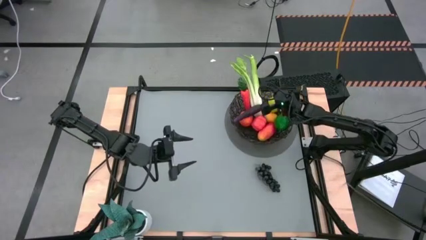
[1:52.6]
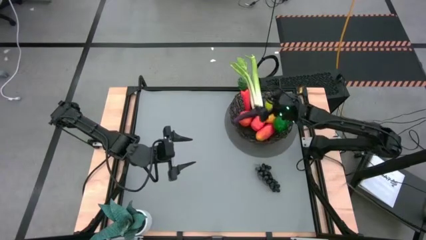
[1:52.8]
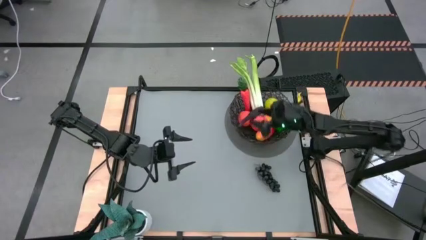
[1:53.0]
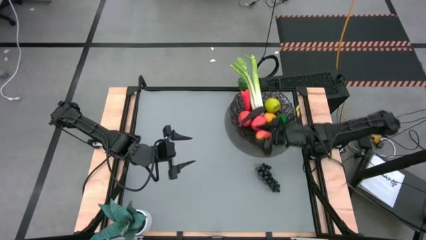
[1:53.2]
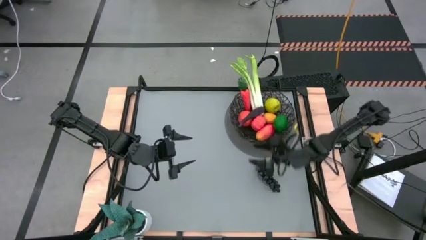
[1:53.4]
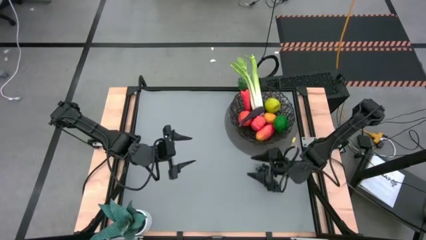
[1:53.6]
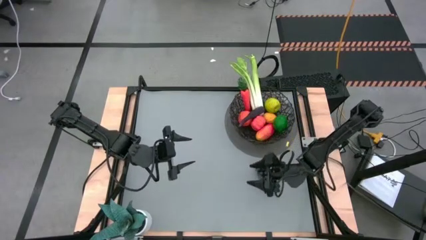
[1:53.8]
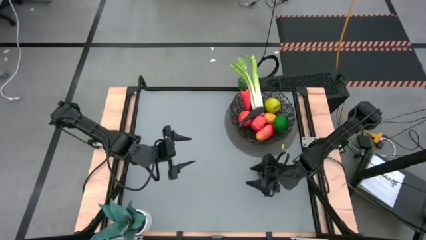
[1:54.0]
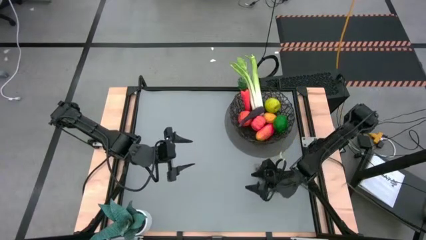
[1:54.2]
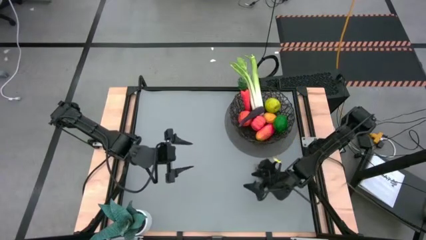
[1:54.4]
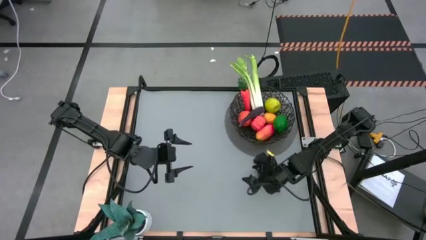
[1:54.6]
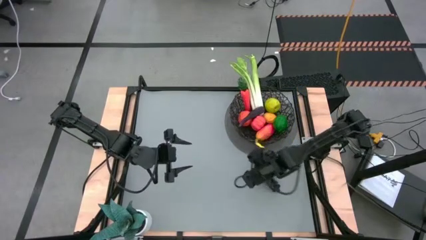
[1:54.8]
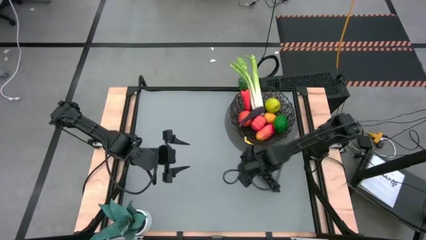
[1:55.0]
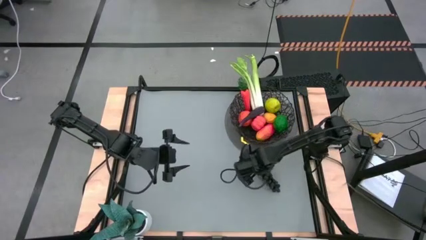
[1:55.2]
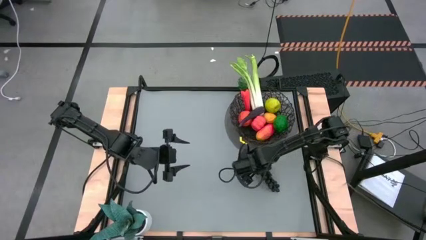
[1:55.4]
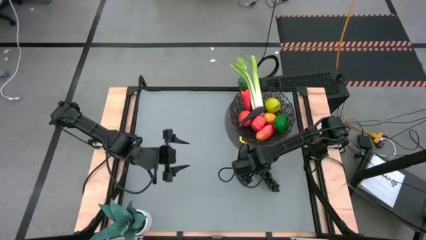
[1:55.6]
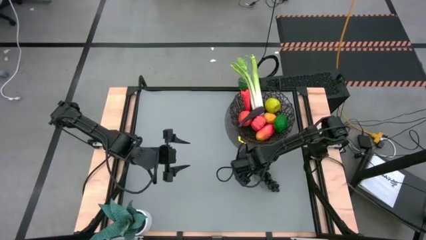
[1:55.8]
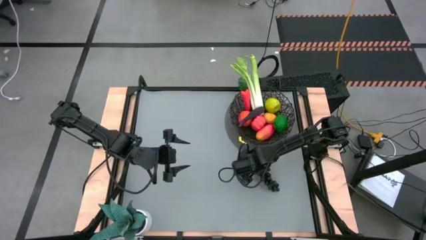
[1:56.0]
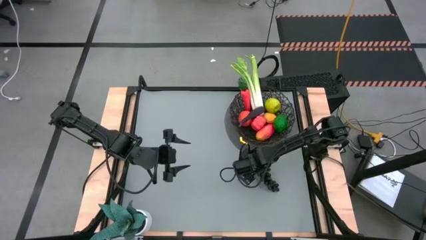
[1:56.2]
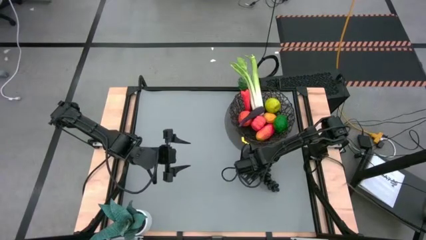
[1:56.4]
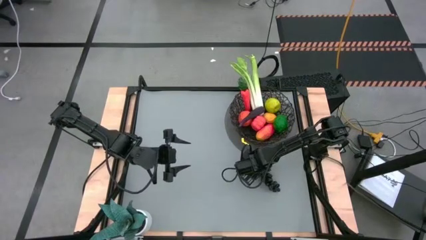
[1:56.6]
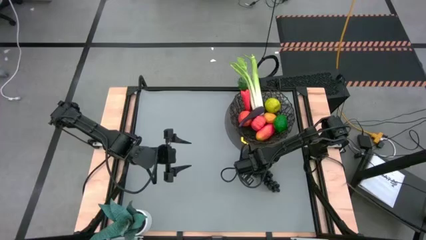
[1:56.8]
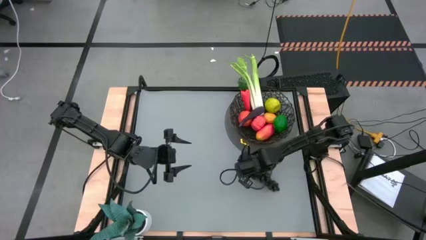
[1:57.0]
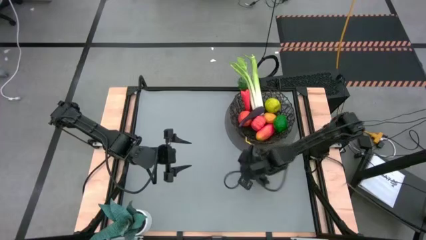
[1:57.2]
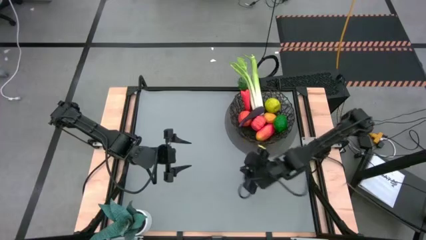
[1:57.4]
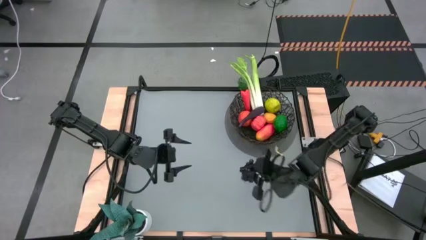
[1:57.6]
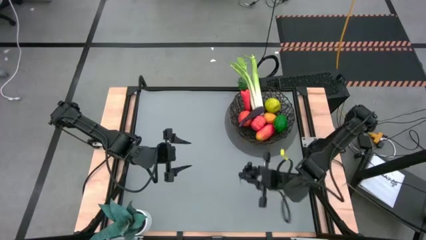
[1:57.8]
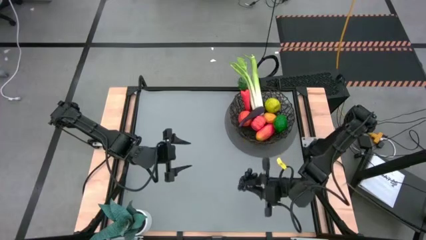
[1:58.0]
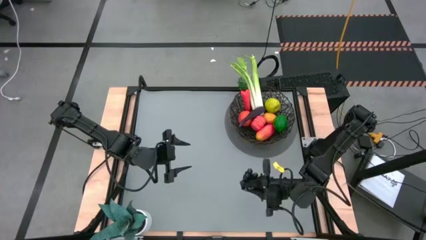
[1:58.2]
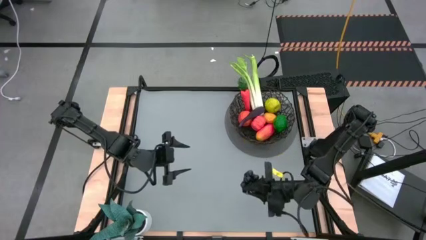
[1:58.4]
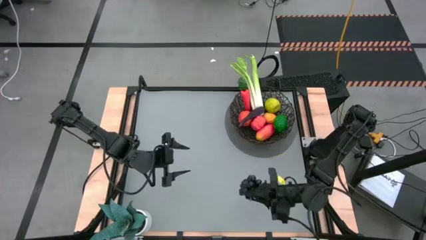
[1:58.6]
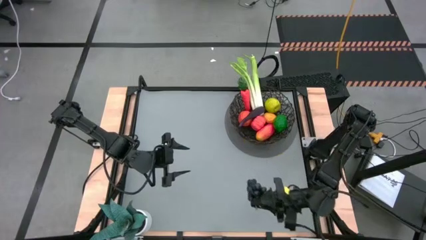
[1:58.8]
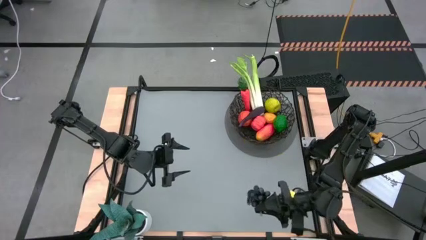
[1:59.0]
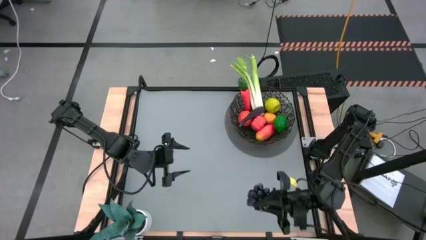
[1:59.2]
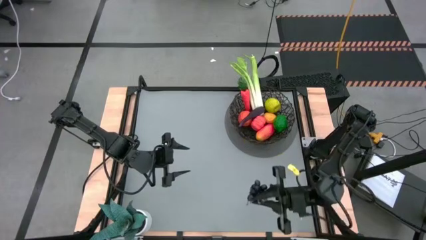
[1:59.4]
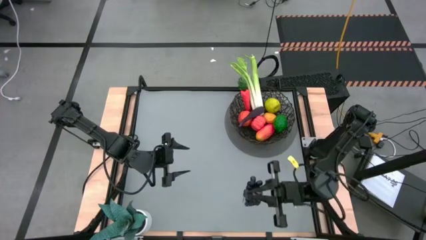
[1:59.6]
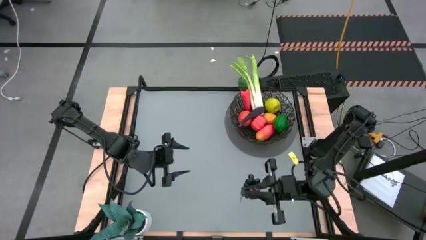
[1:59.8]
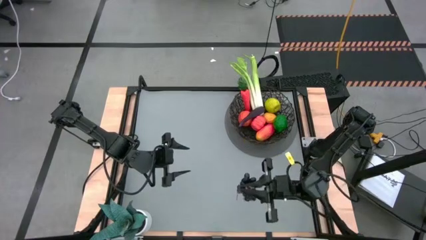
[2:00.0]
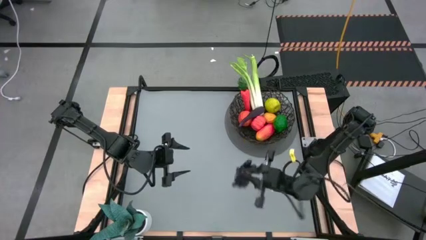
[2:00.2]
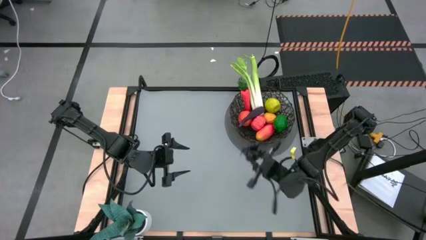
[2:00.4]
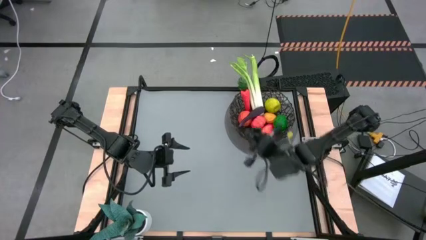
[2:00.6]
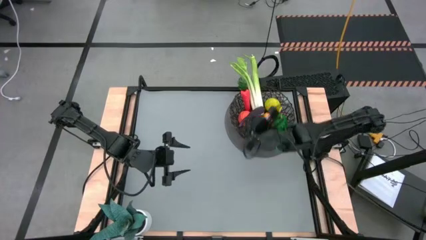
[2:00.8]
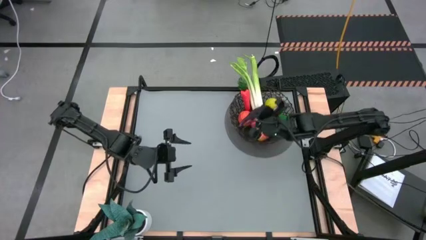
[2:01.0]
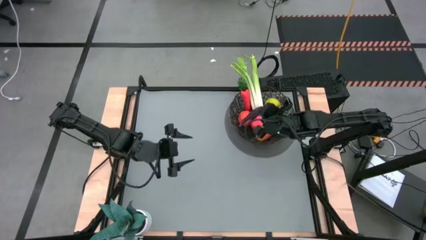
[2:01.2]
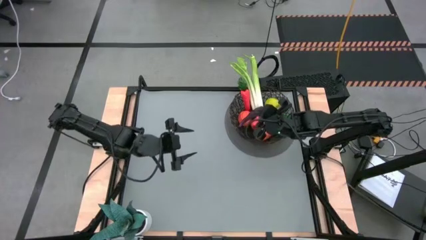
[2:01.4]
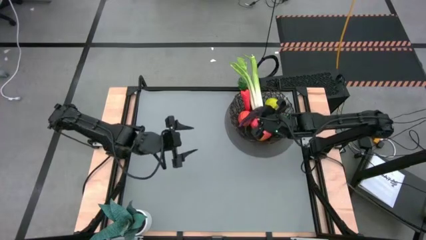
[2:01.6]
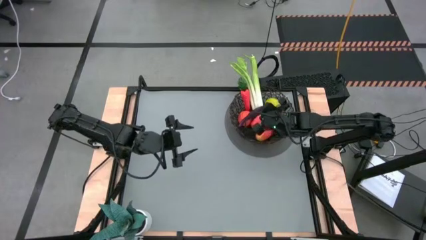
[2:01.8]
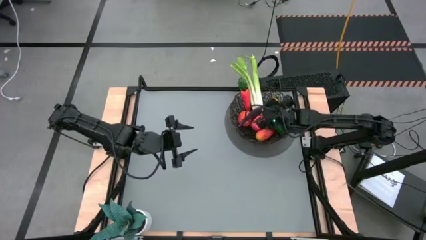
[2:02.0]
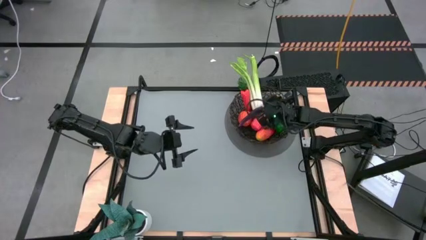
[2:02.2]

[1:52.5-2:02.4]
Task: Build produce basket
Put the grapes into the black wire basket

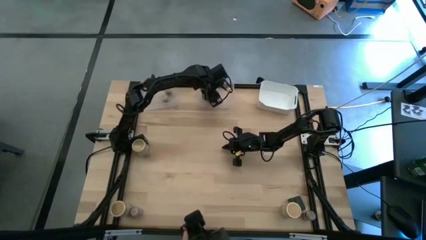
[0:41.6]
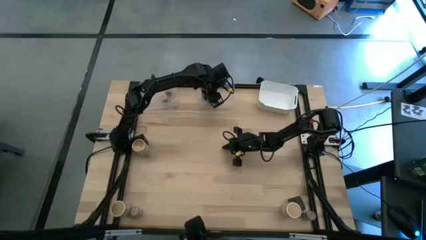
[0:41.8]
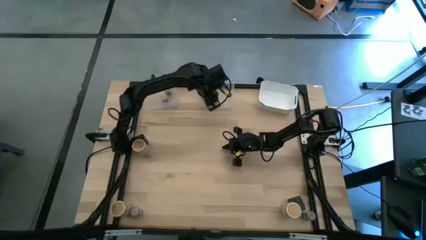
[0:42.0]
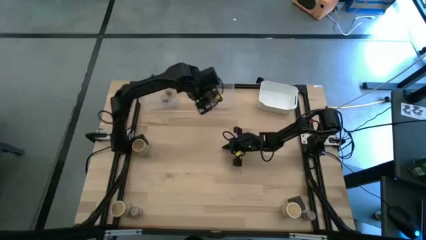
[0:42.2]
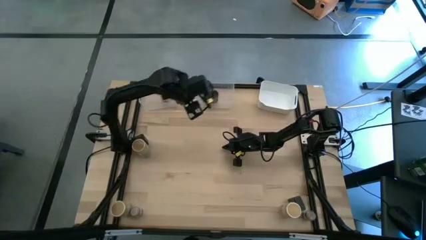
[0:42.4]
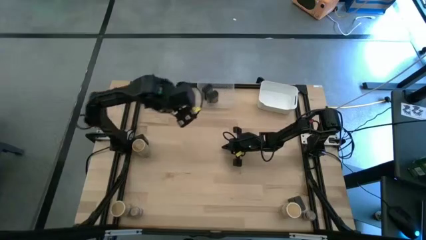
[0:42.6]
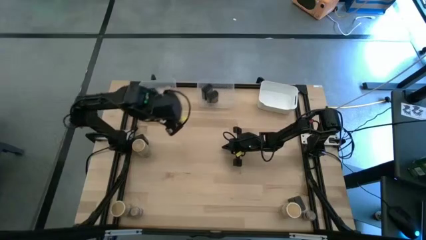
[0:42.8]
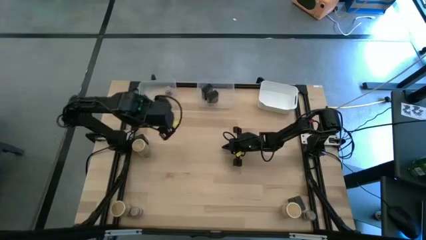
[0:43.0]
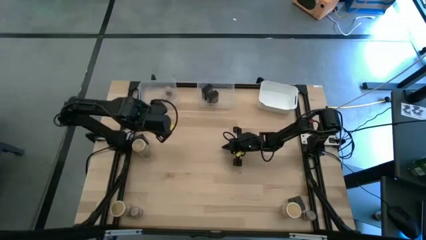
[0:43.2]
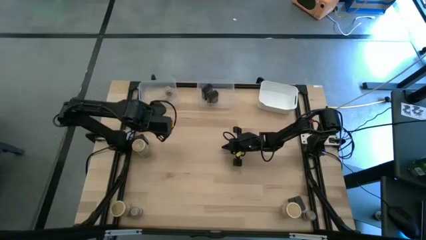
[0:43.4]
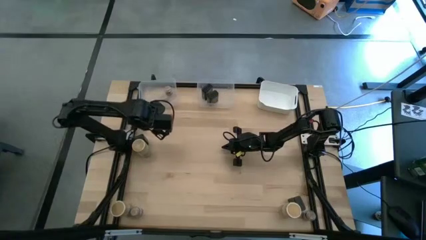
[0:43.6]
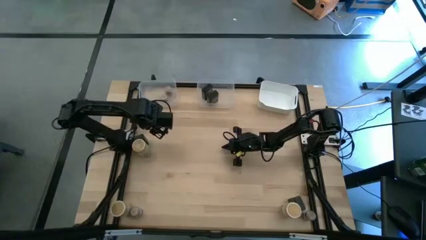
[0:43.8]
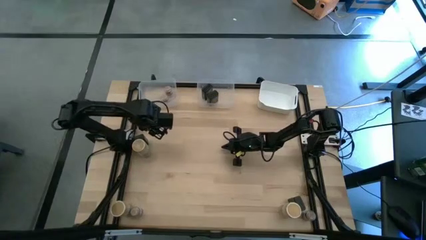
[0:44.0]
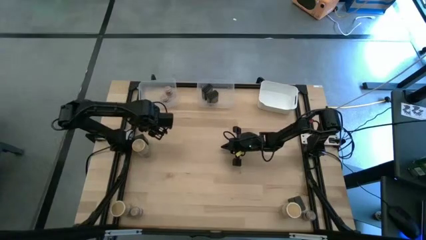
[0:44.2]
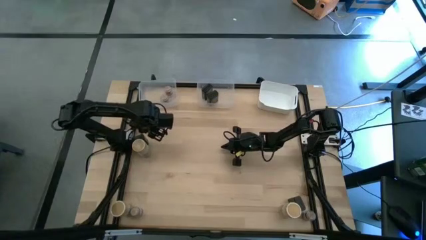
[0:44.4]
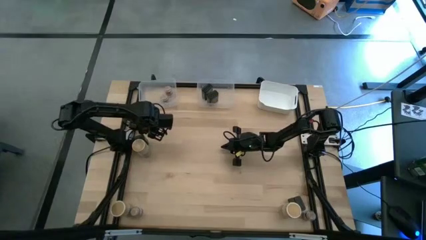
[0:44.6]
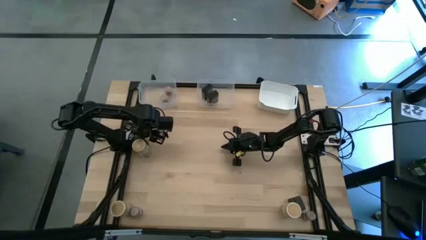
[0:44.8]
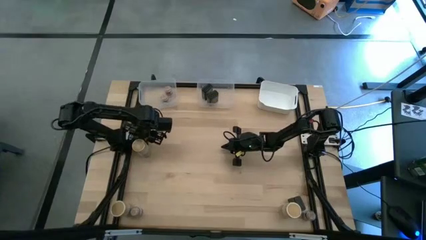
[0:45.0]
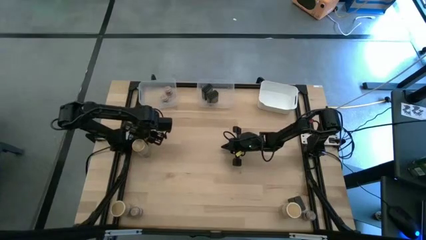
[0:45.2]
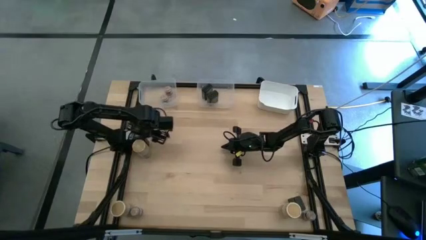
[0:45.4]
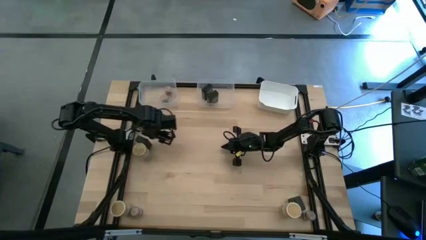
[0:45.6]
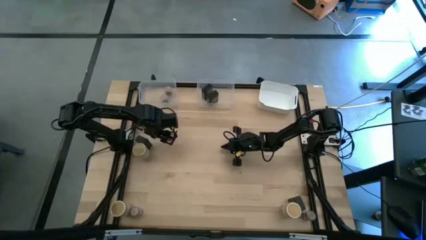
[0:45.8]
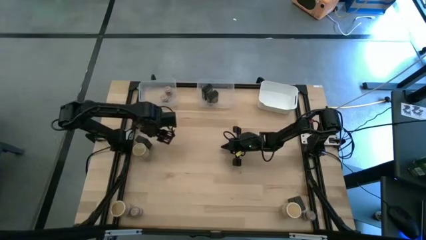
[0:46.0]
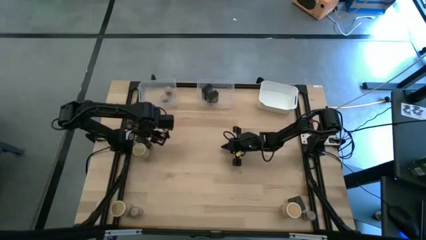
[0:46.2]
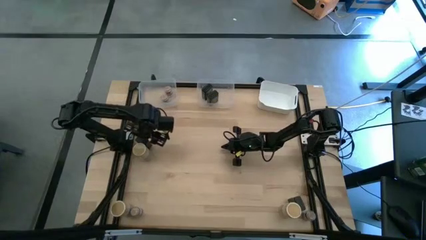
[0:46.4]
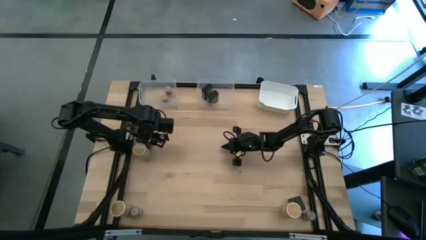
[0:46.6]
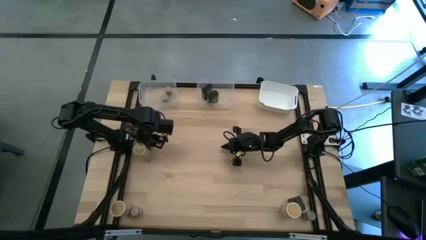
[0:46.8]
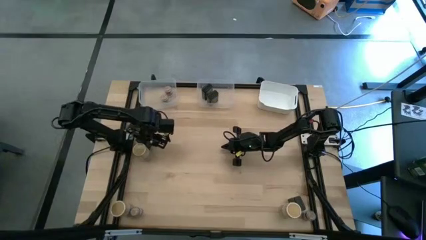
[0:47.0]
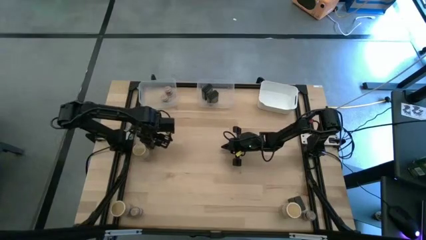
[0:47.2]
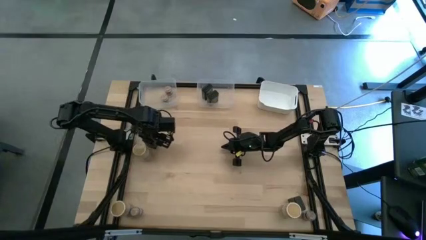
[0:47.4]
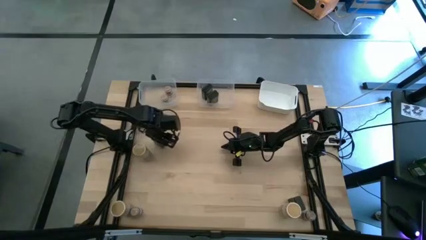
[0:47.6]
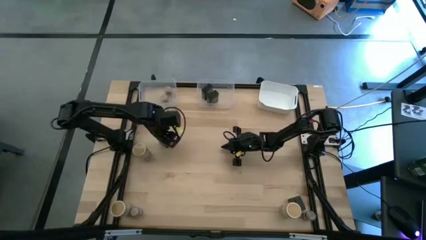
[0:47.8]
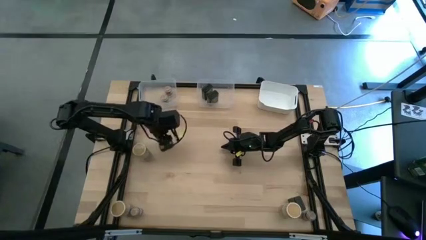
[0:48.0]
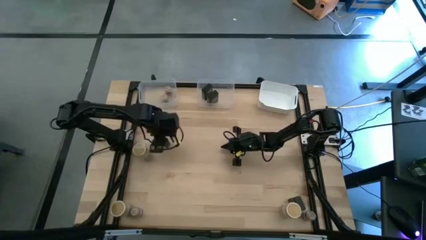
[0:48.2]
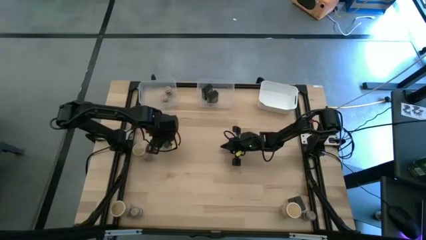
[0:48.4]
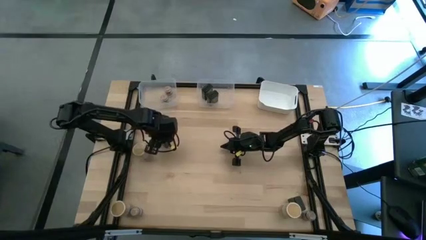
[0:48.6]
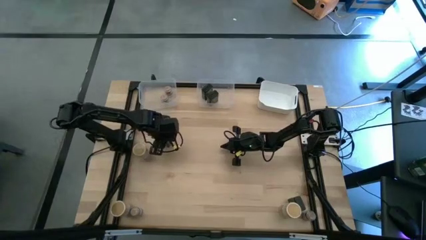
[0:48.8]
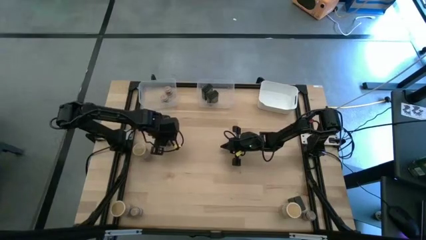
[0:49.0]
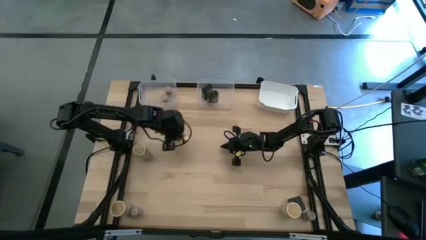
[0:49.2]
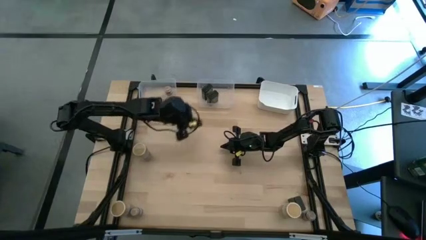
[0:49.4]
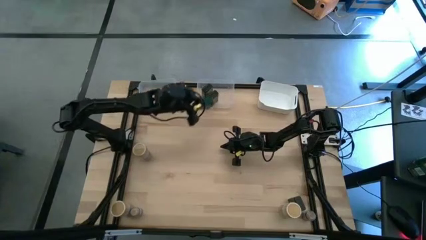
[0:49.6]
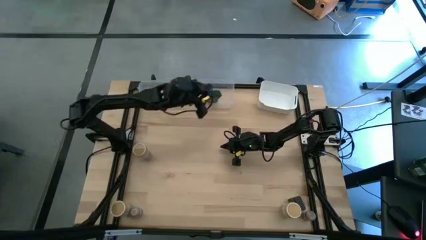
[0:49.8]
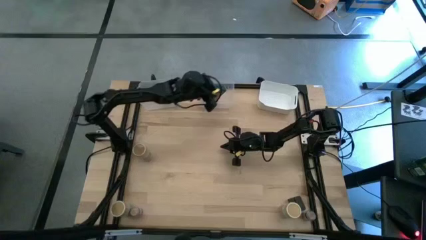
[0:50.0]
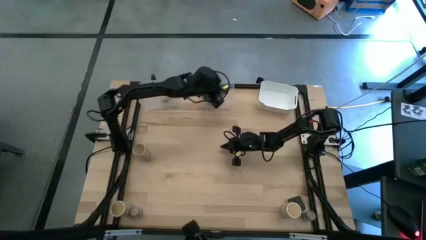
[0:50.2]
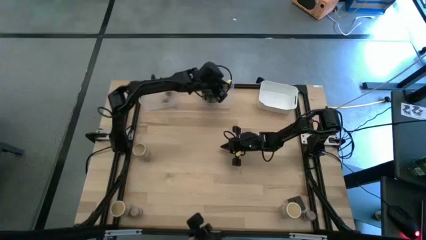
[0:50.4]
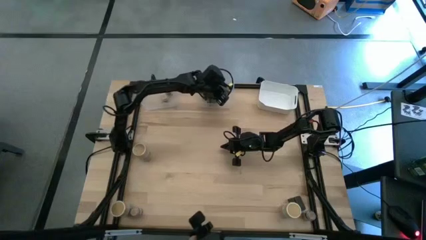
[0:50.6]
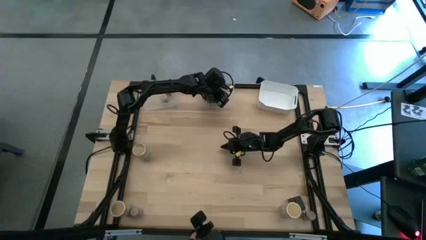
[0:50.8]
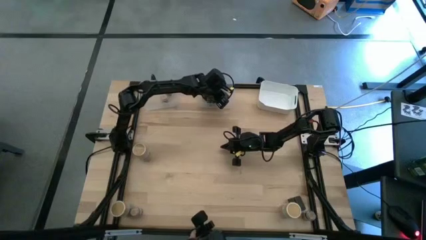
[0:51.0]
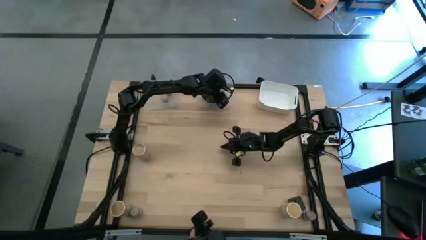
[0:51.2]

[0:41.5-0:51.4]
Task: Sort spices by type
Put the top black seasoning can into the middle transparent bin
